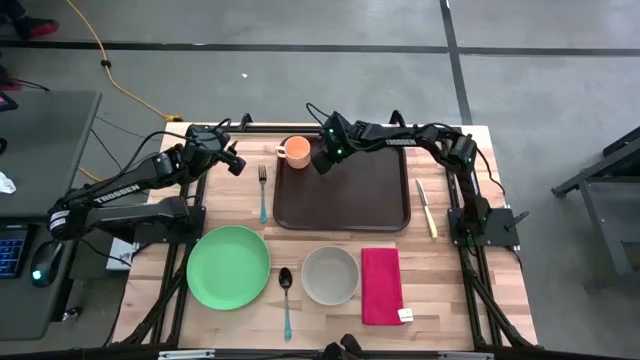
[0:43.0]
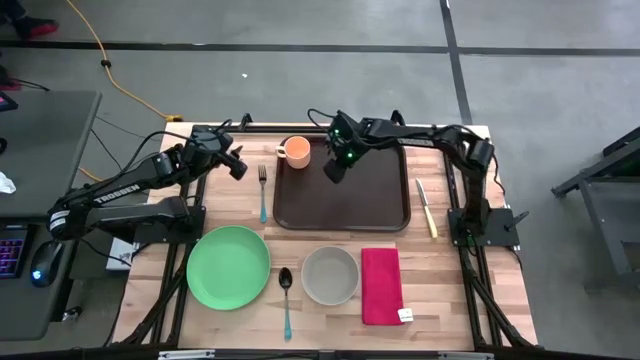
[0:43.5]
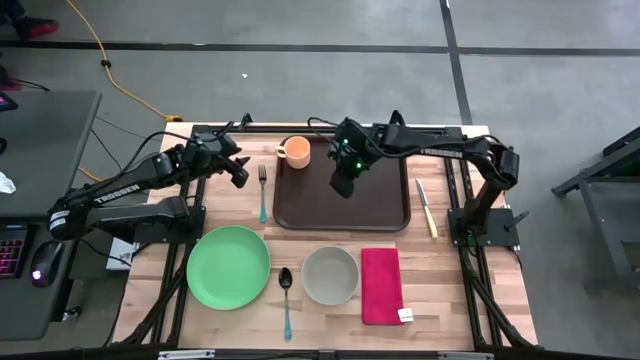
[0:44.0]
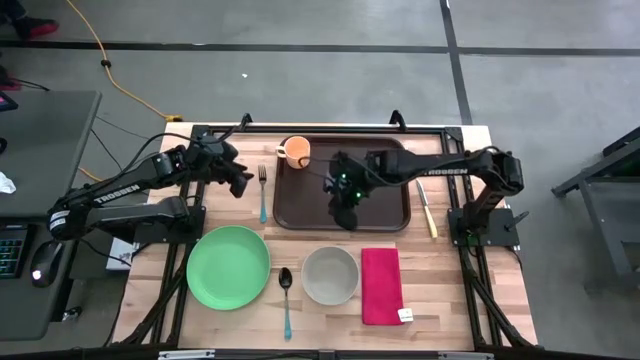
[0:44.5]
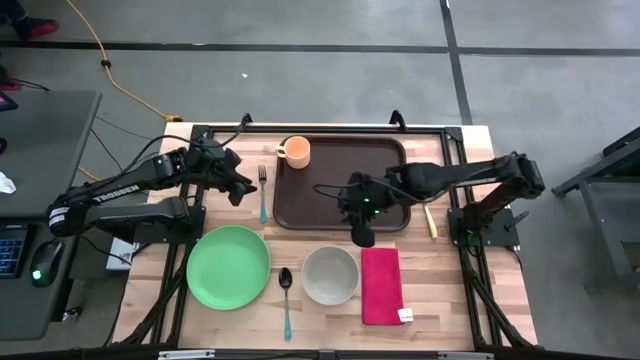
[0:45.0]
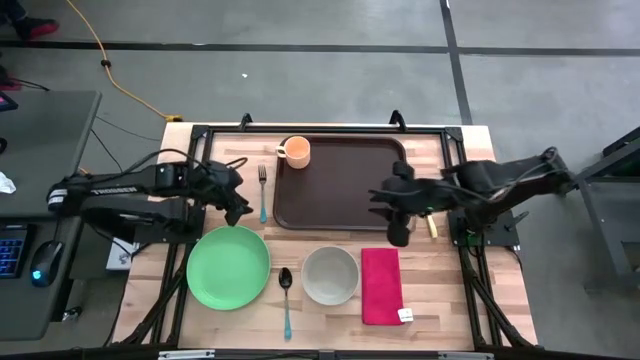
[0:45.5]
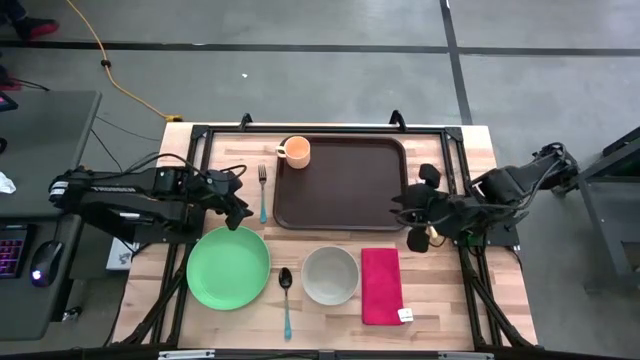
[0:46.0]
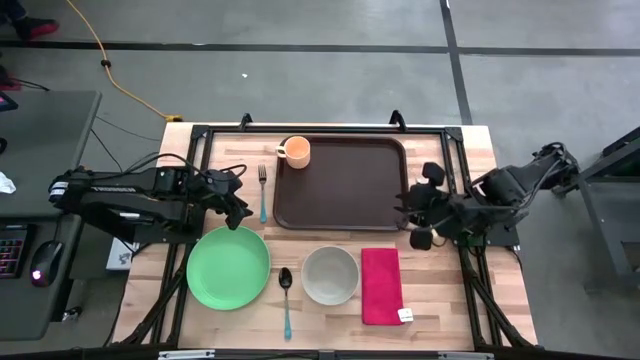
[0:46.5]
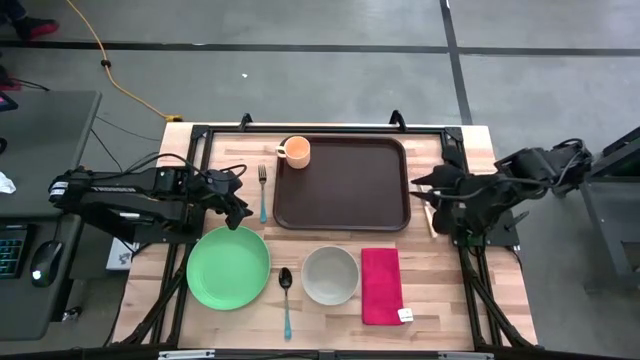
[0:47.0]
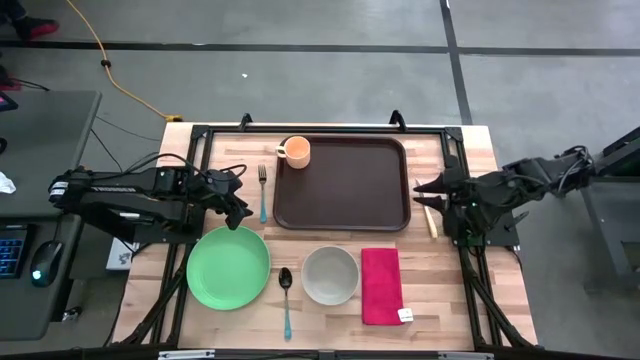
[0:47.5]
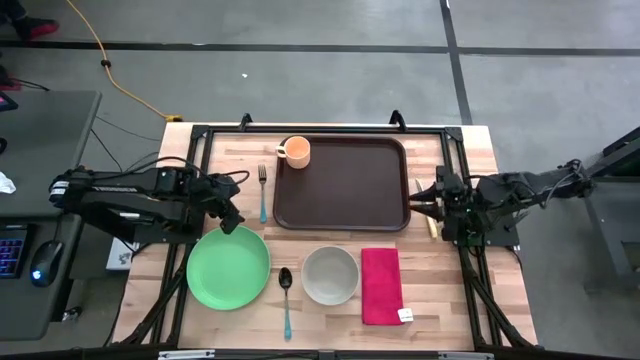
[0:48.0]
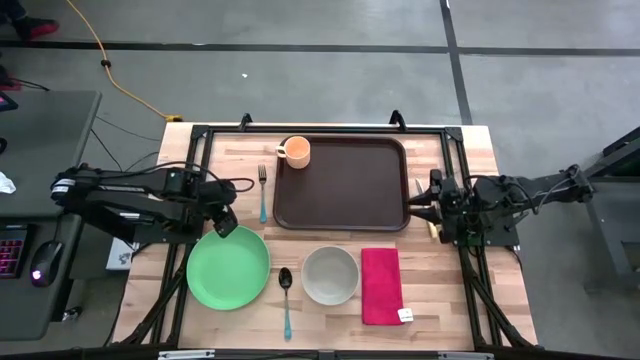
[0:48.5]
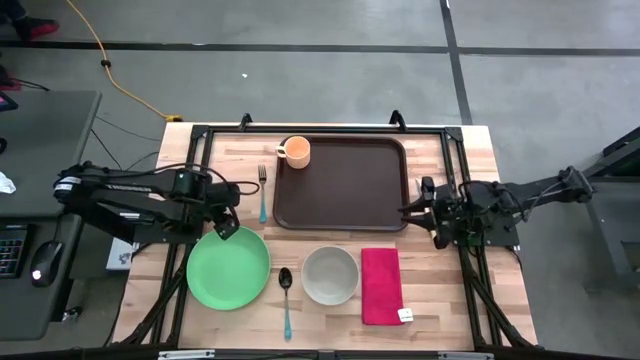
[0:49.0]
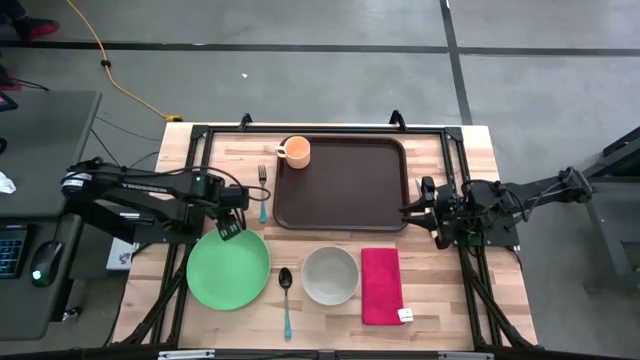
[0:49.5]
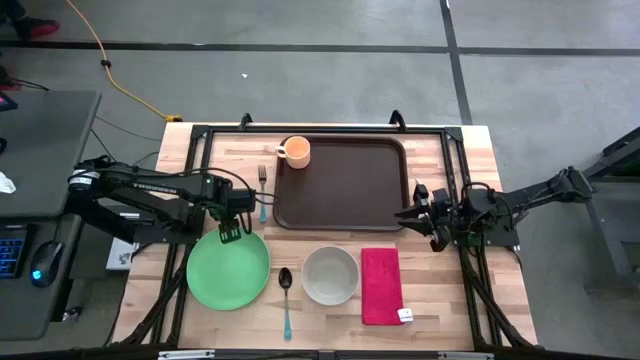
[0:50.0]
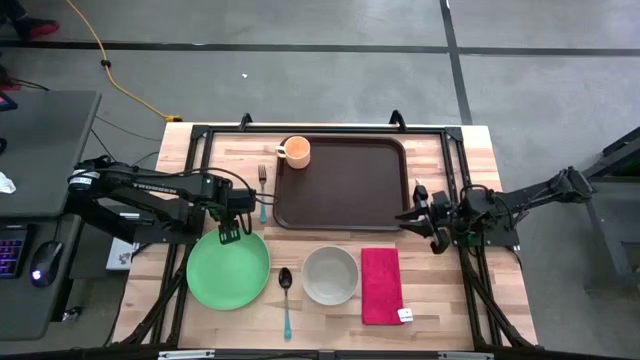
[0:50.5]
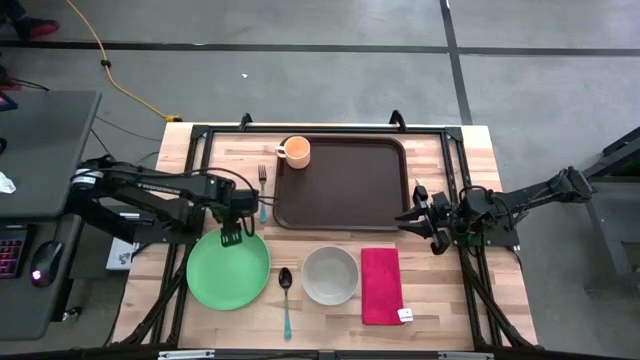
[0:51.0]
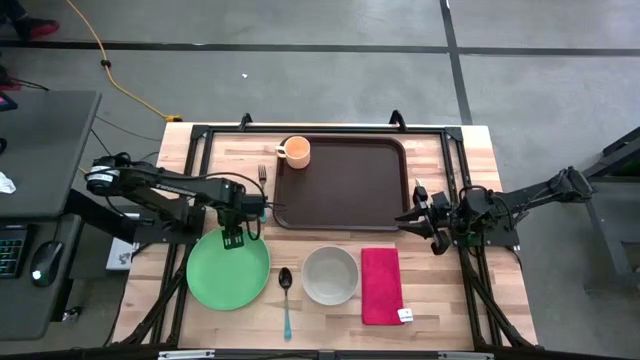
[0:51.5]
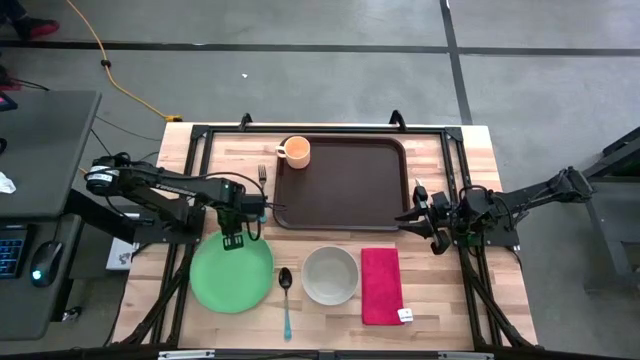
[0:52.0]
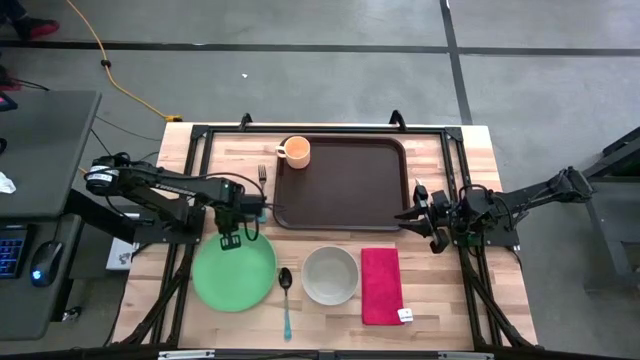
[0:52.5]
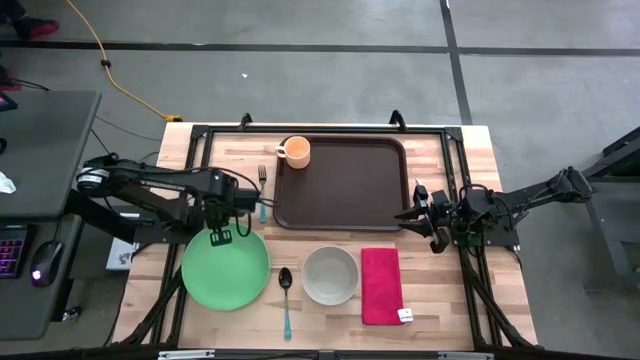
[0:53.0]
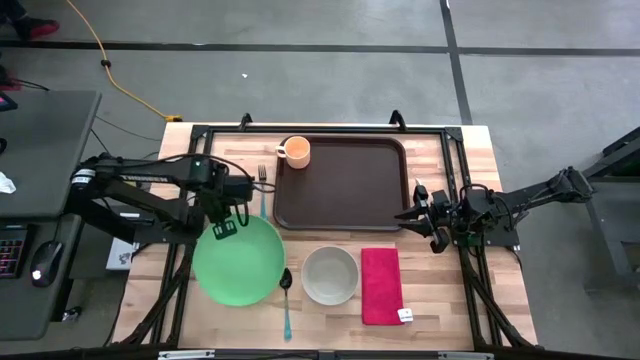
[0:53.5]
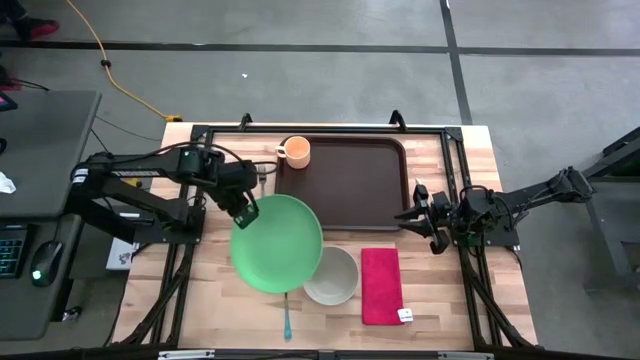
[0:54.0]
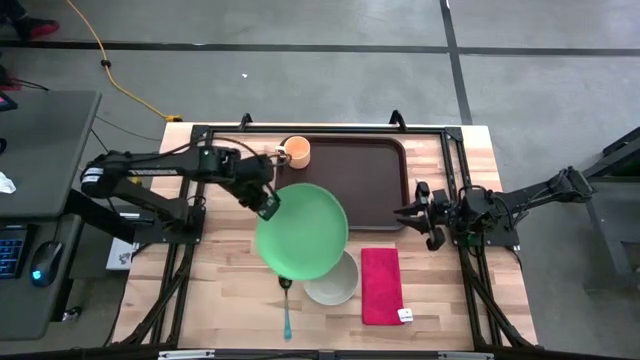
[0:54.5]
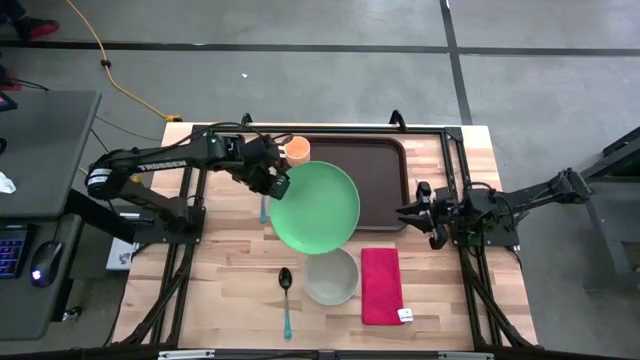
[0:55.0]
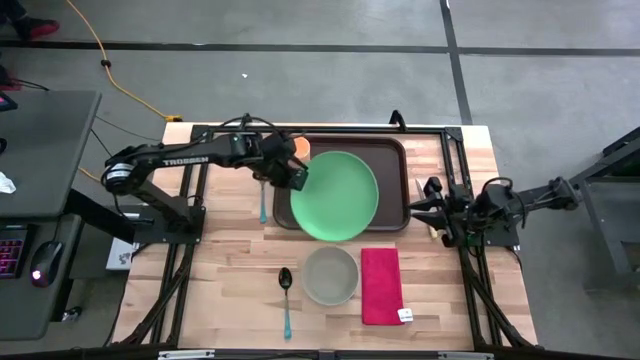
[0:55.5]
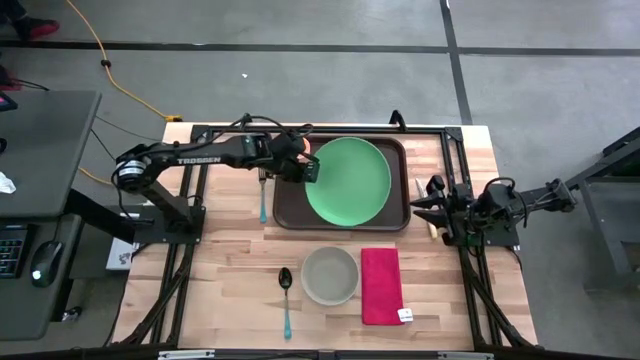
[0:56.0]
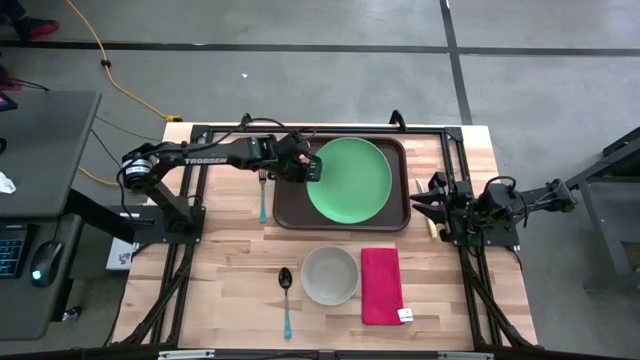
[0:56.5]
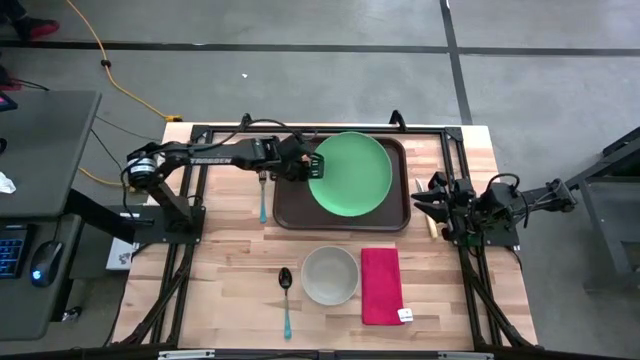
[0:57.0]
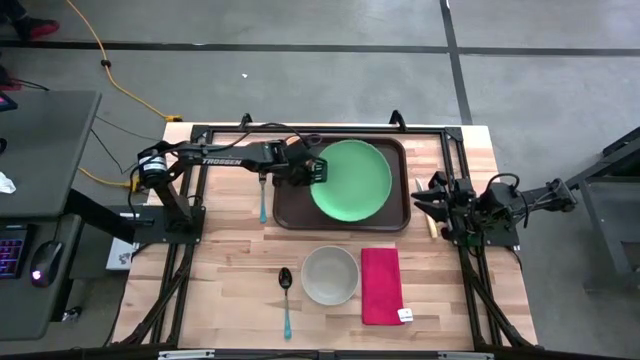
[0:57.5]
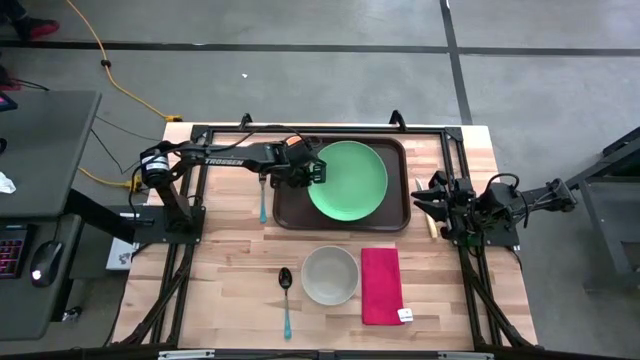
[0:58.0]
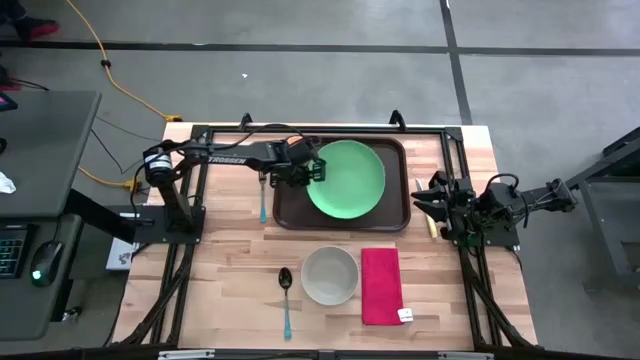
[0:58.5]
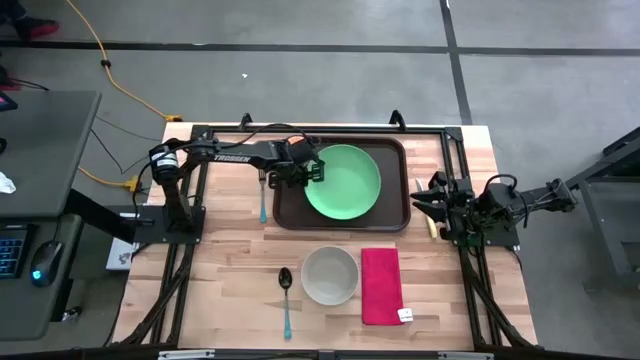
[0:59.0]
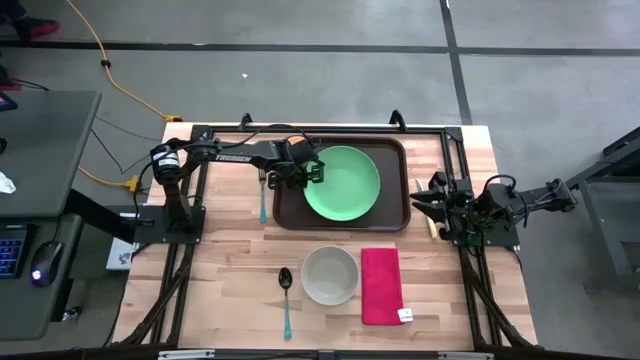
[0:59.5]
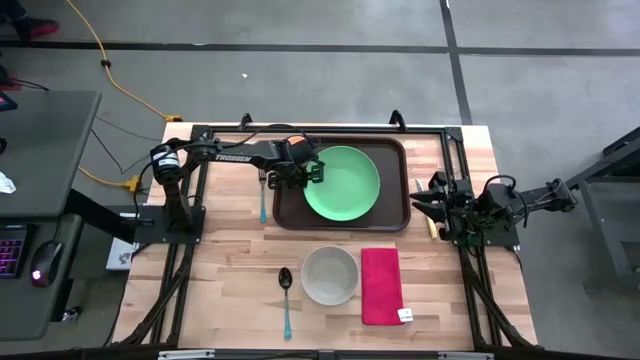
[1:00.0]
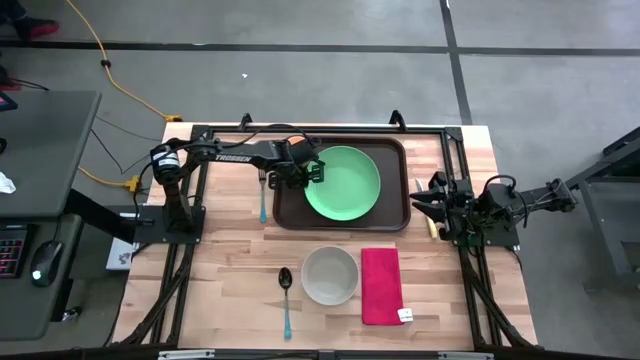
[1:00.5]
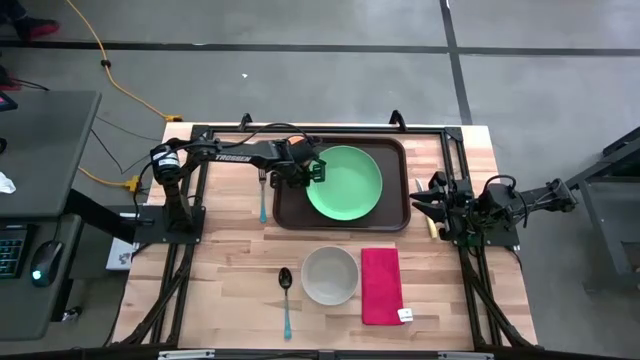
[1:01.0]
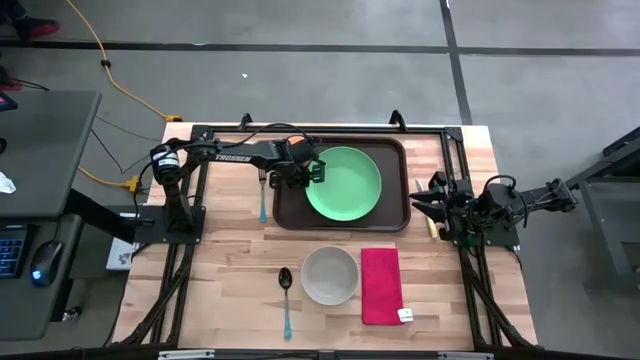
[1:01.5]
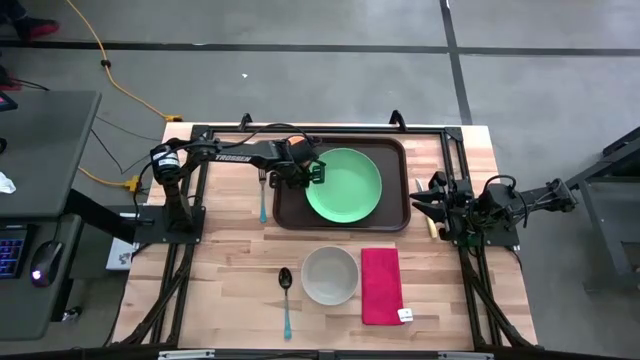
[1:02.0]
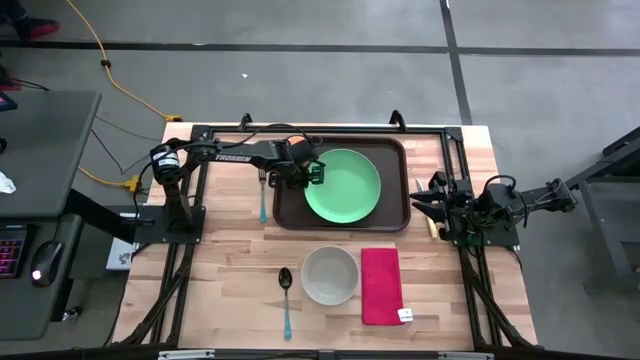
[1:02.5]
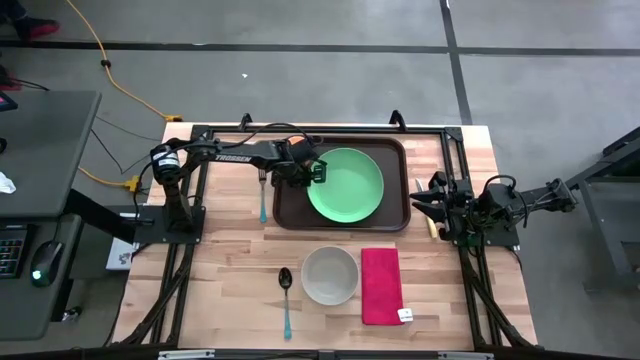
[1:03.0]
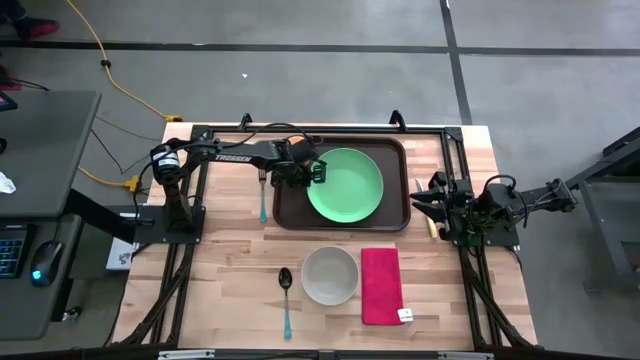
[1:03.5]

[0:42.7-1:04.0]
Task: Set up tray
Put the green plate to the right of the orange mug on the brown tray

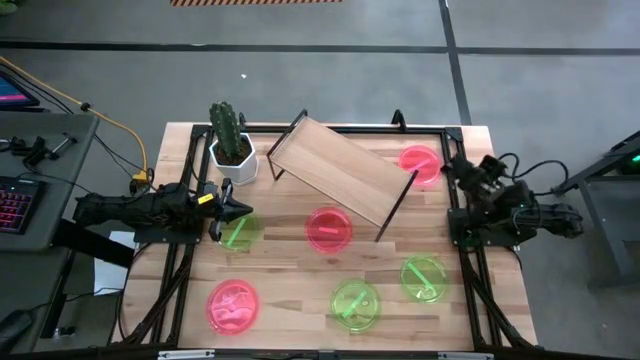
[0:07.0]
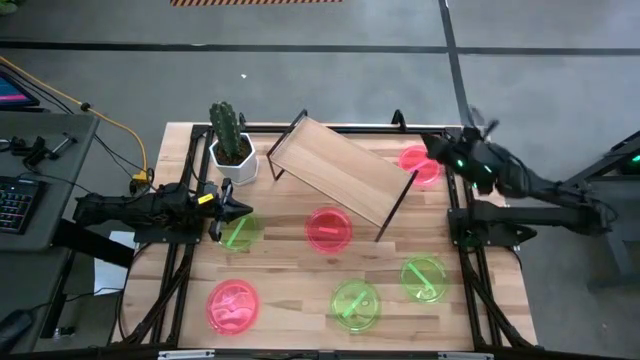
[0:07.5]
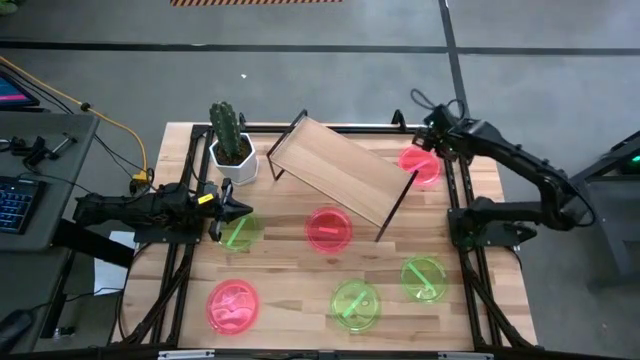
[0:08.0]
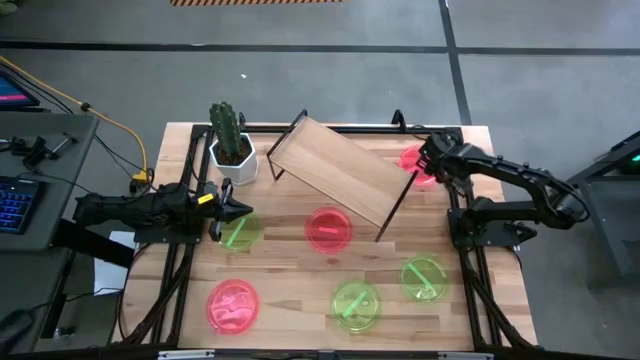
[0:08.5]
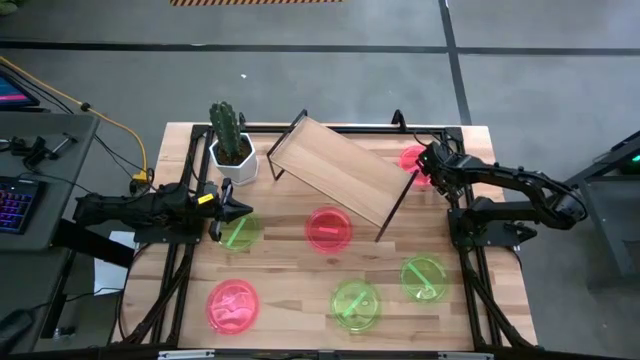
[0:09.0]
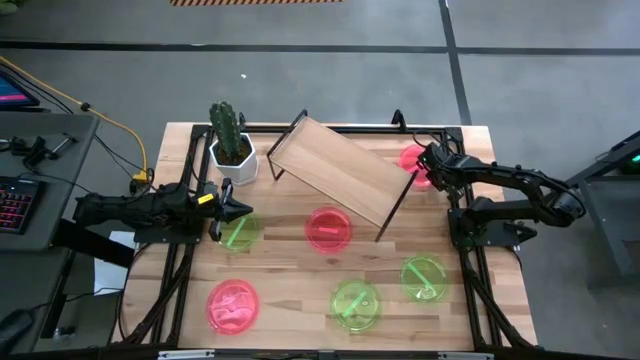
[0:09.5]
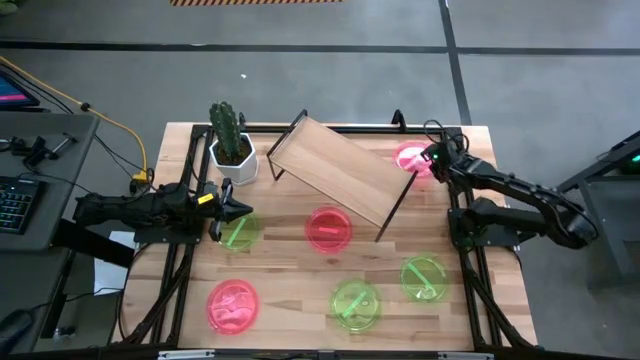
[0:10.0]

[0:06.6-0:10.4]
Task: Place and stack plates onto a shelf
Put the top right light pink plate on the shelf
